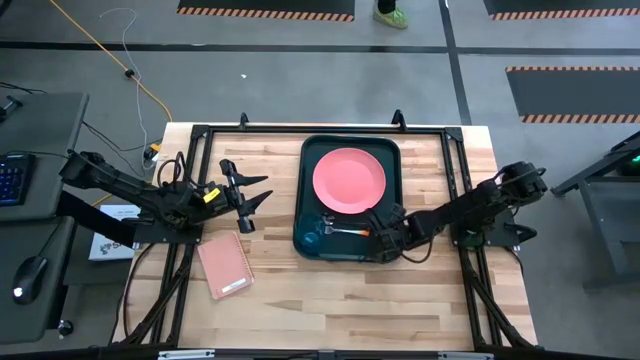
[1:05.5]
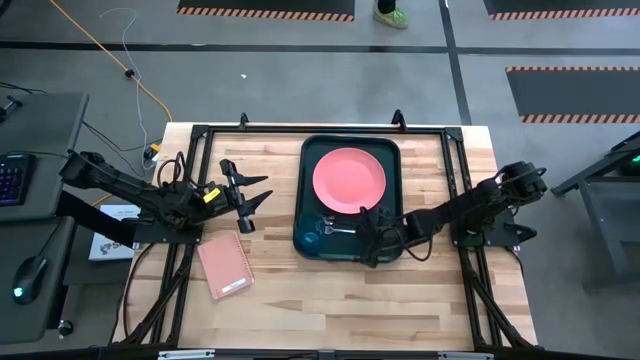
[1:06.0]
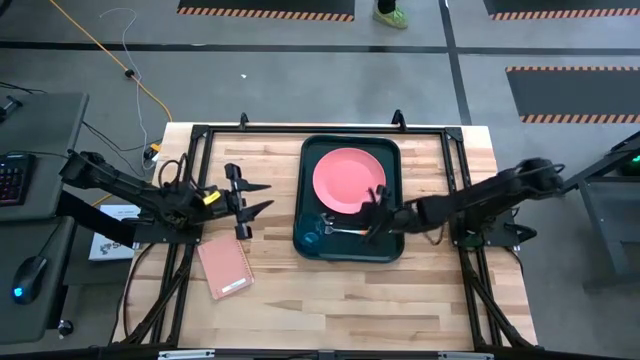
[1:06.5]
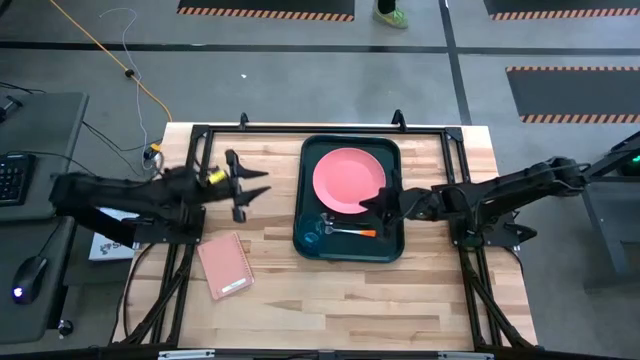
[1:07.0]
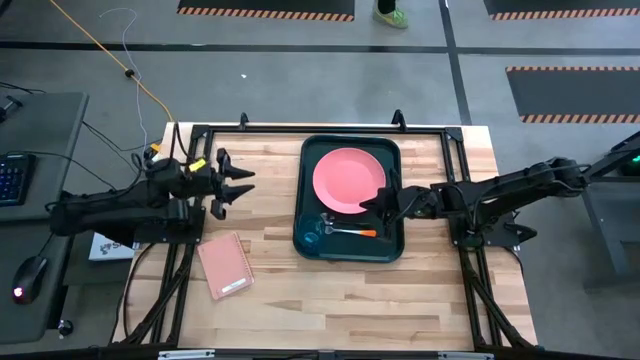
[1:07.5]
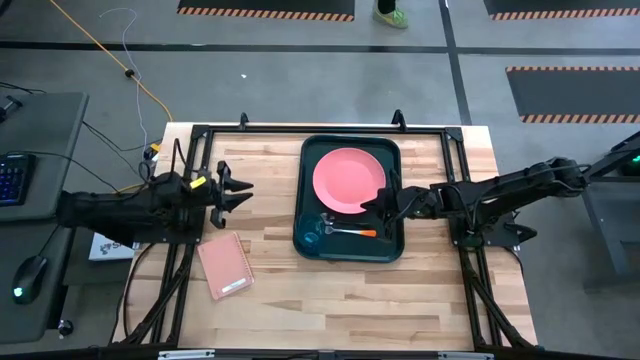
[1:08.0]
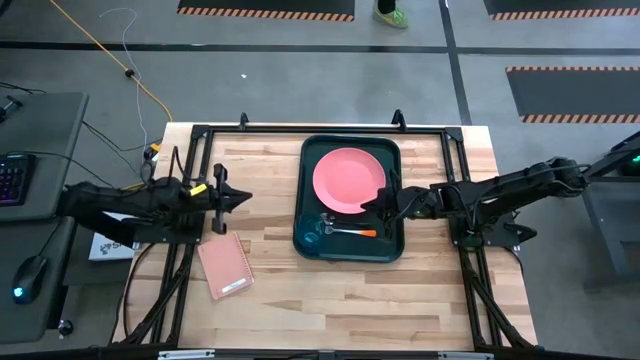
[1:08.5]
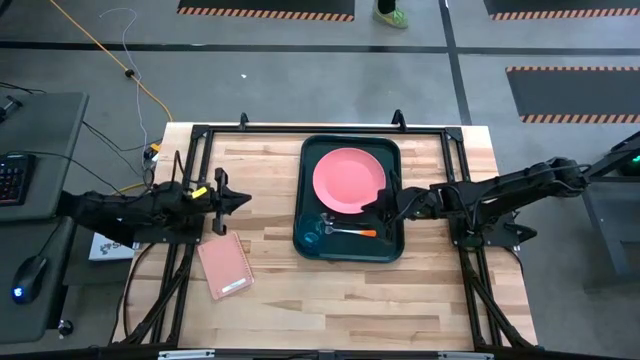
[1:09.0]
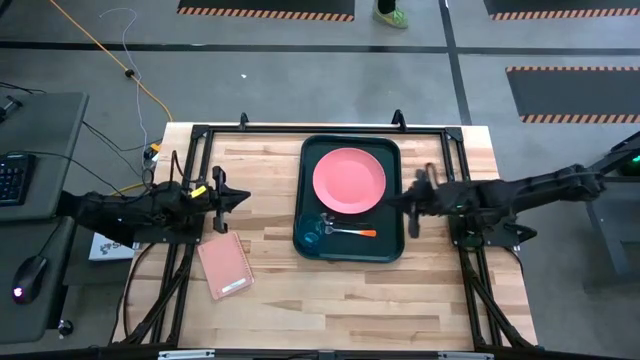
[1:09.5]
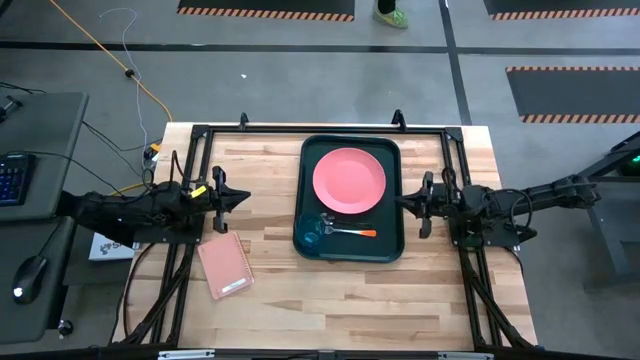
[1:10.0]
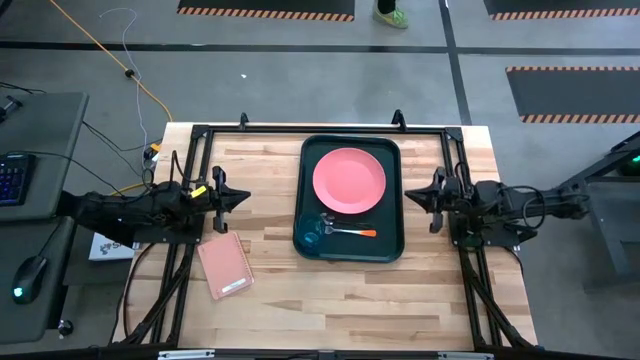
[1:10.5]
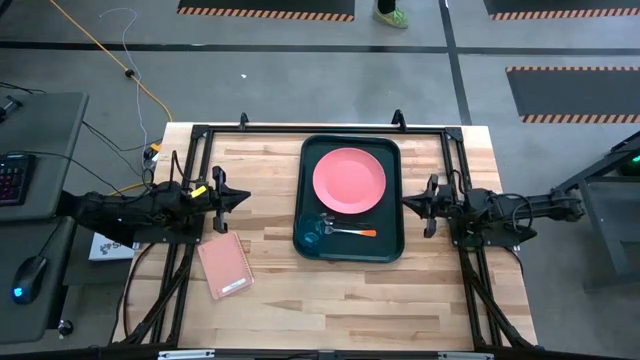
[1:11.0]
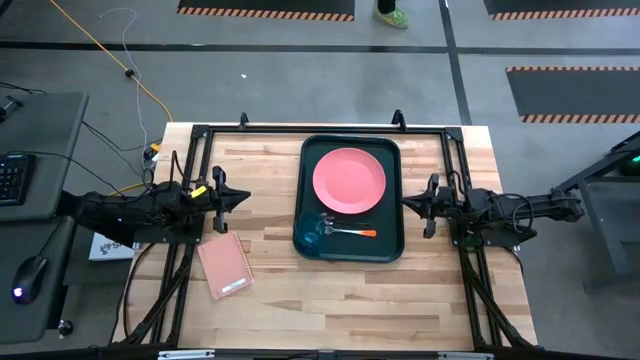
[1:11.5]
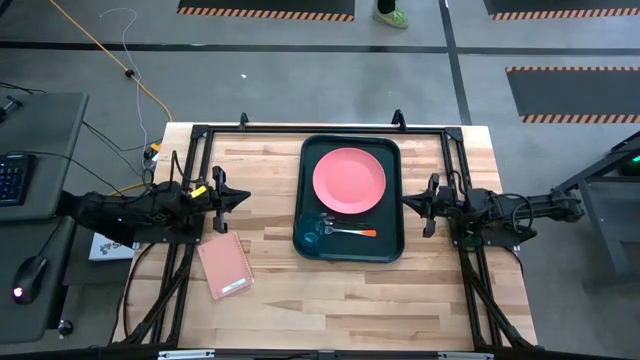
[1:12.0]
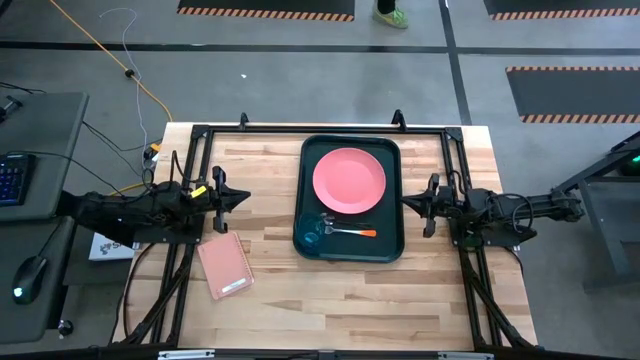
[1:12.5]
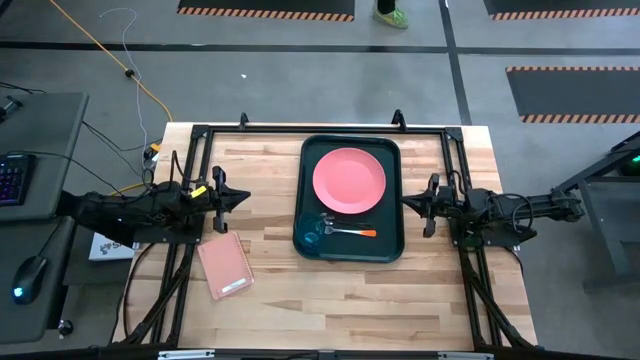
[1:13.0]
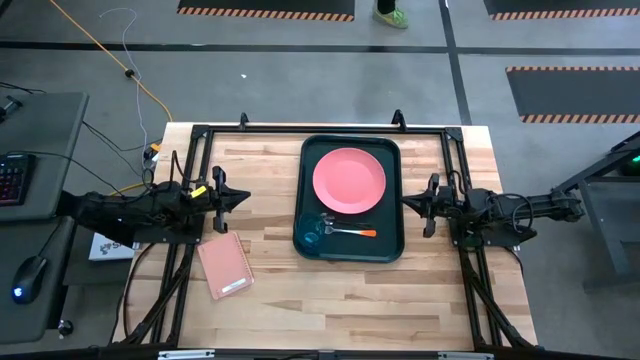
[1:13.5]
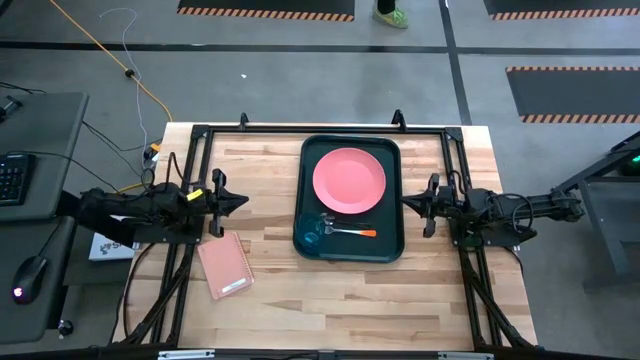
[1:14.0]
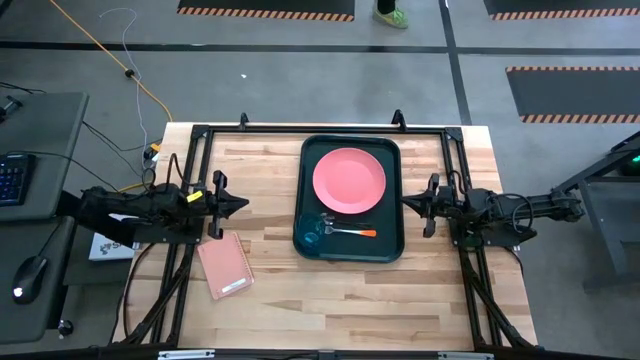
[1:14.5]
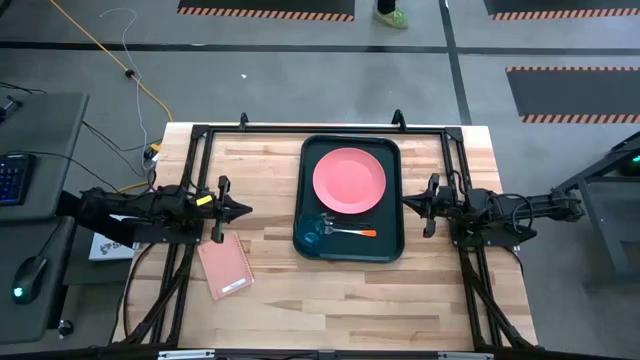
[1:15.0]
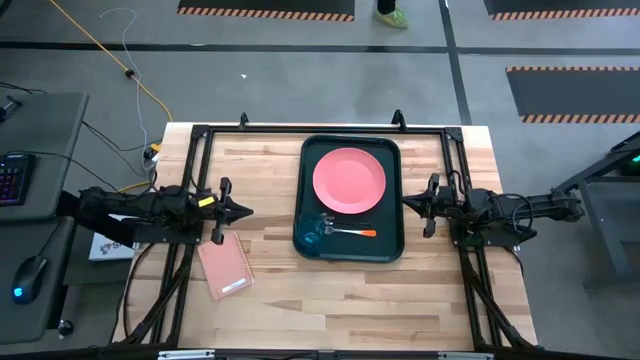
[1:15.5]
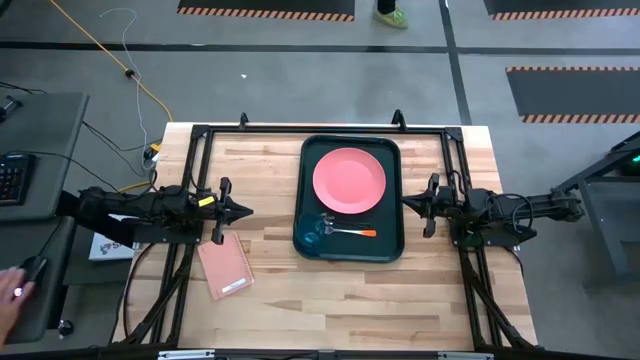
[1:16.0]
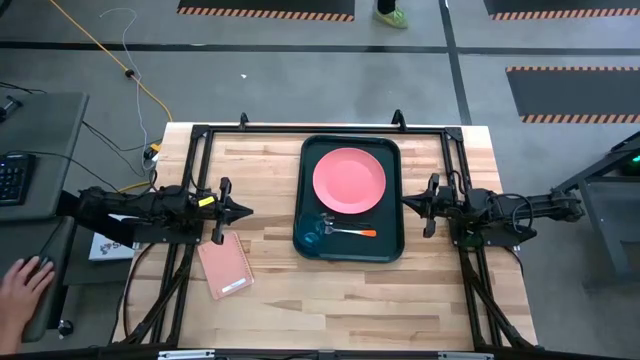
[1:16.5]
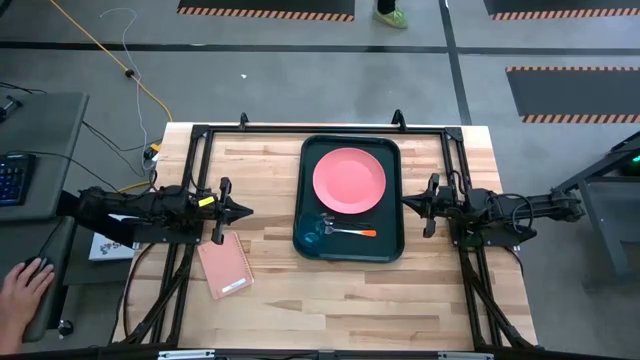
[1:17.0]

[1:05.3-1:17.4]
Task: Pick and place plate/cup/fork/spoon on tray
Return to Home Position

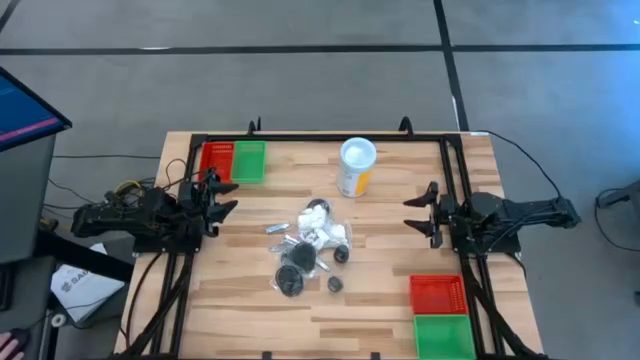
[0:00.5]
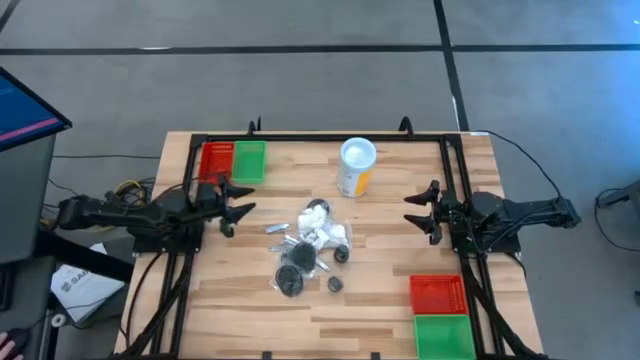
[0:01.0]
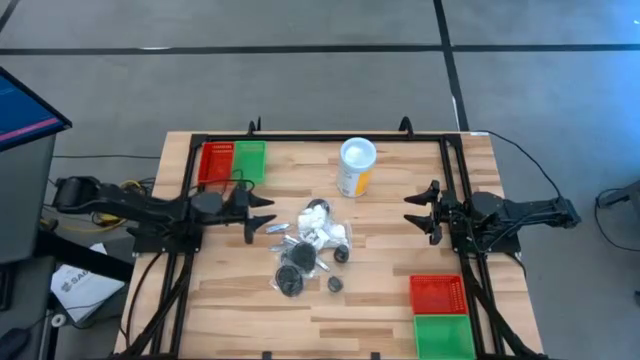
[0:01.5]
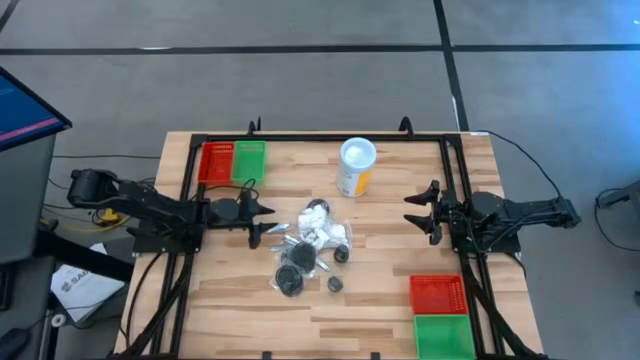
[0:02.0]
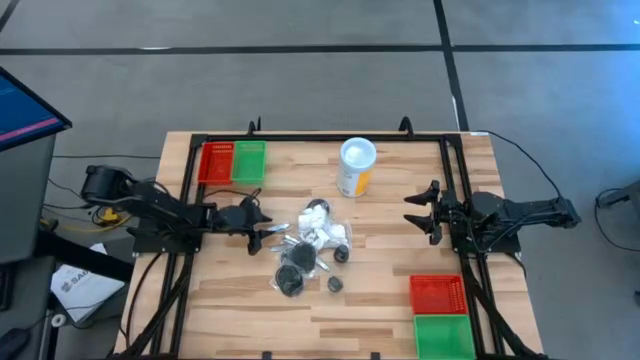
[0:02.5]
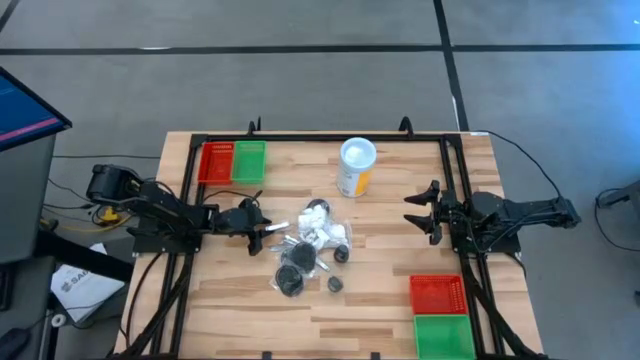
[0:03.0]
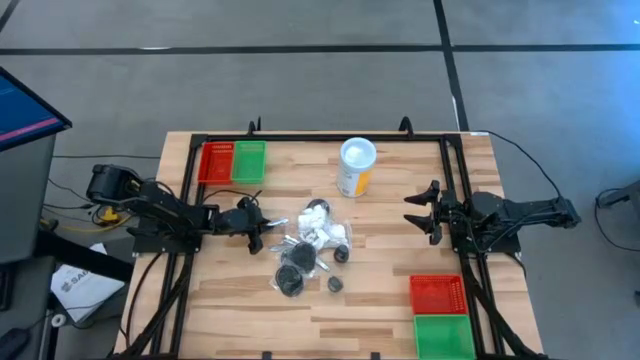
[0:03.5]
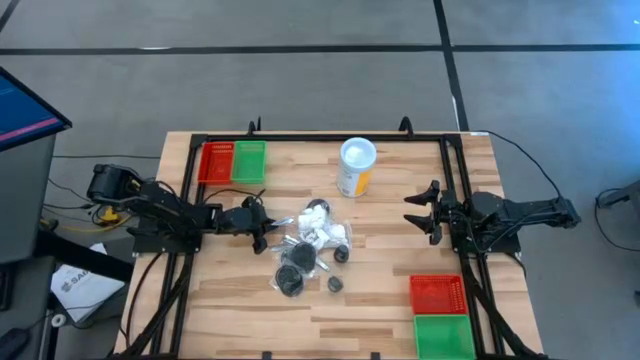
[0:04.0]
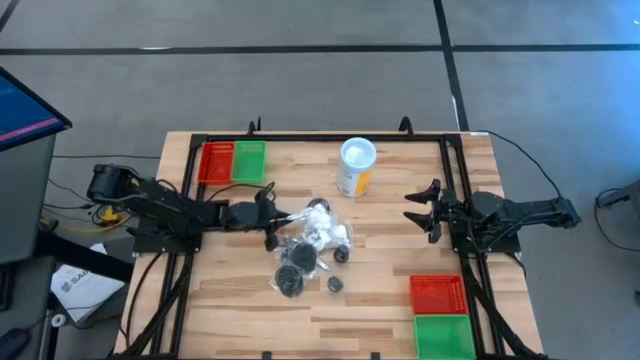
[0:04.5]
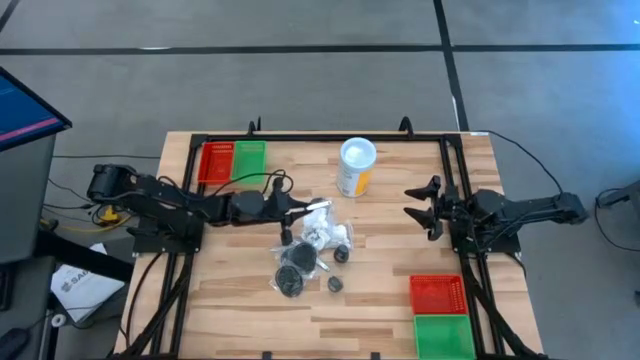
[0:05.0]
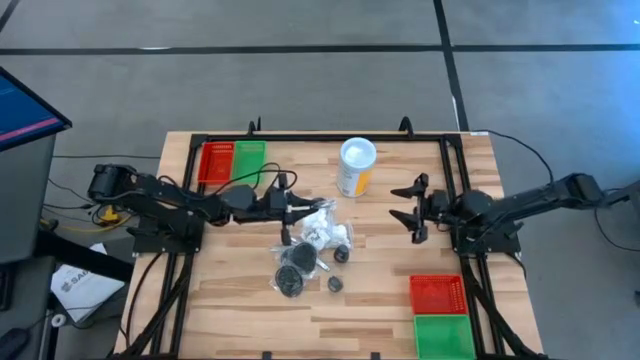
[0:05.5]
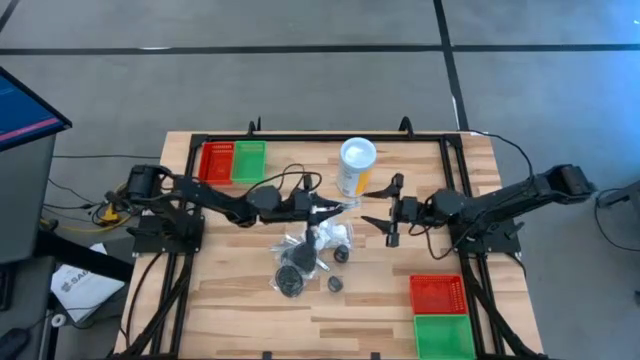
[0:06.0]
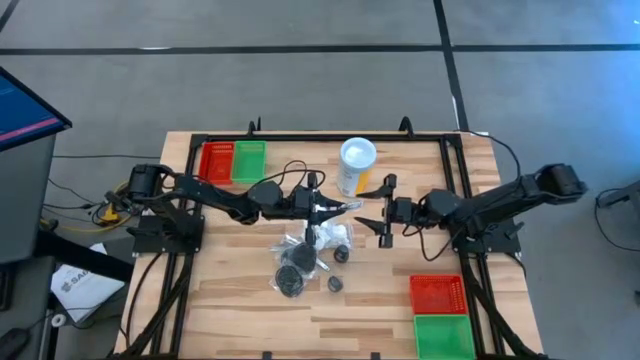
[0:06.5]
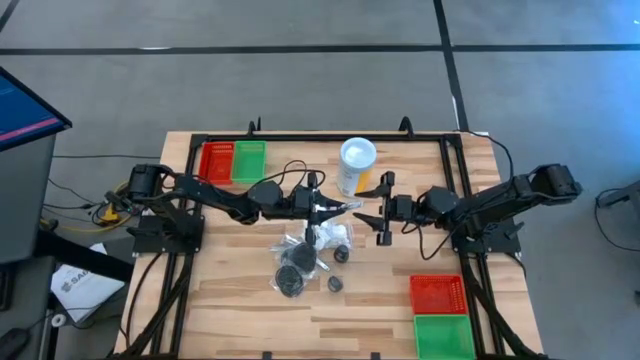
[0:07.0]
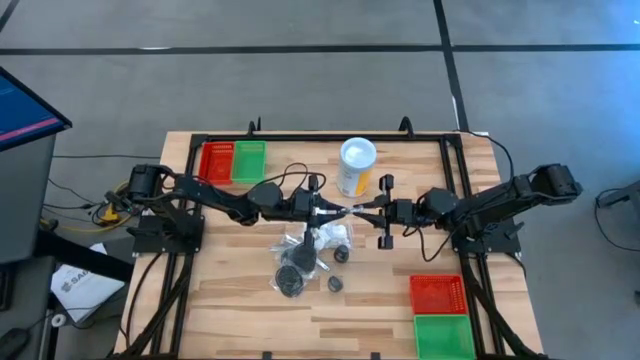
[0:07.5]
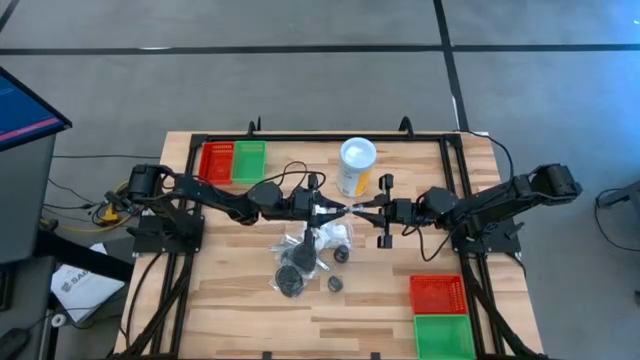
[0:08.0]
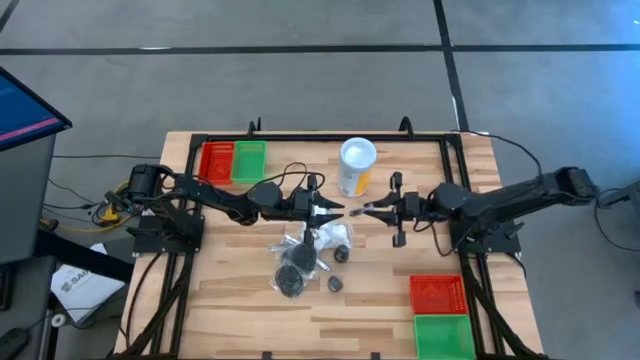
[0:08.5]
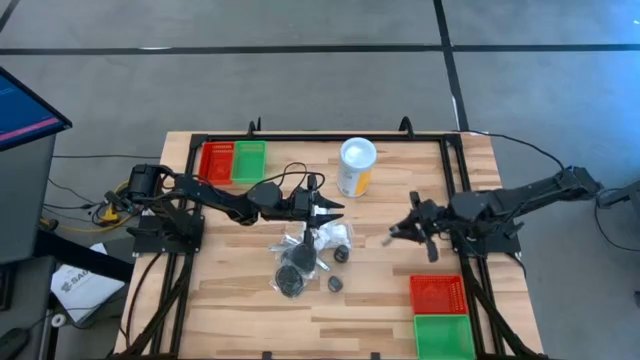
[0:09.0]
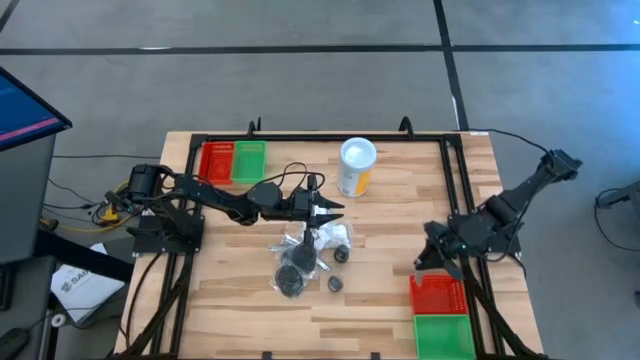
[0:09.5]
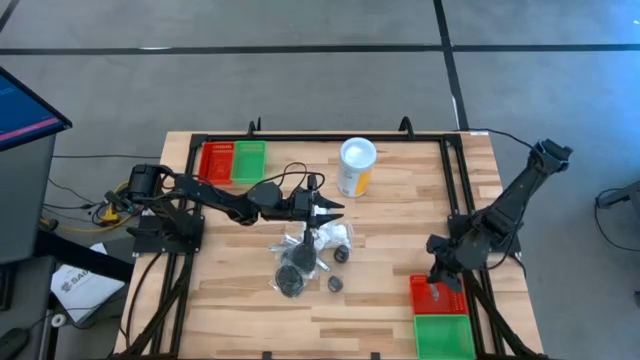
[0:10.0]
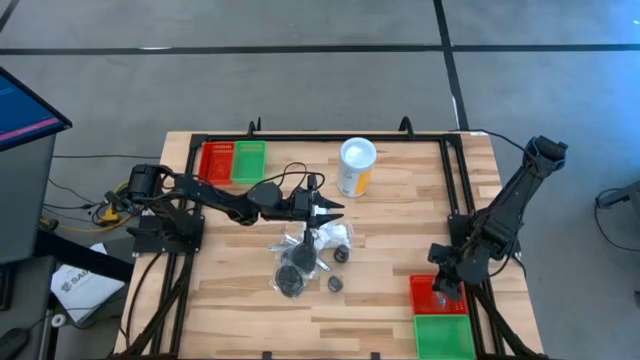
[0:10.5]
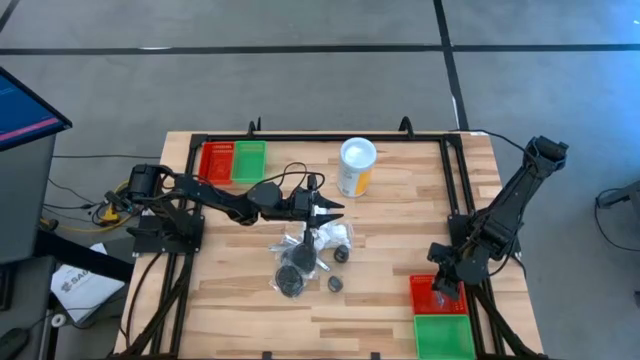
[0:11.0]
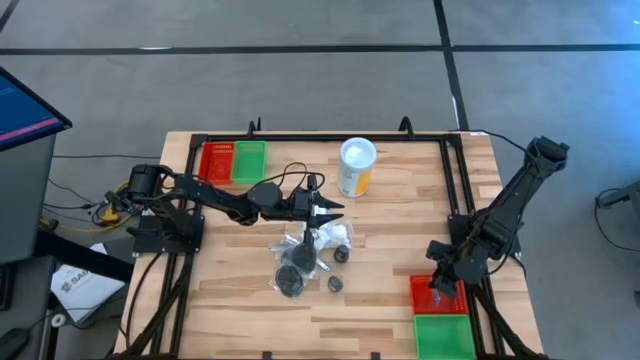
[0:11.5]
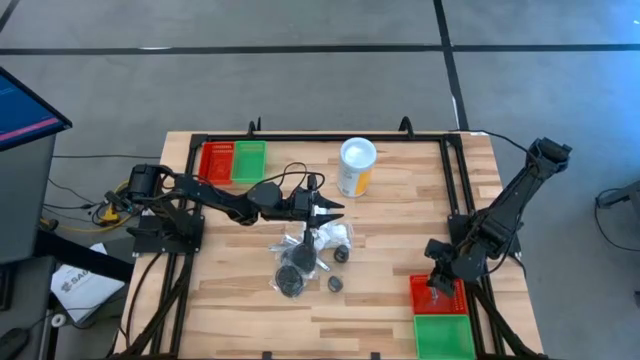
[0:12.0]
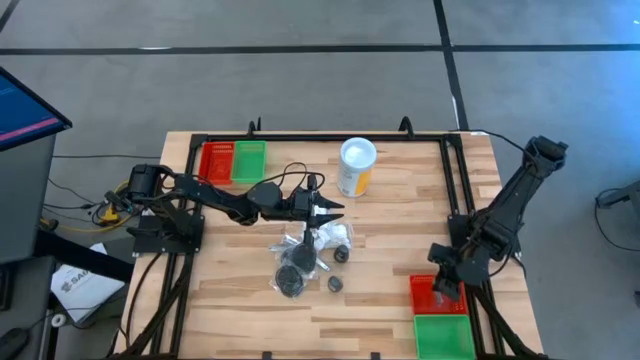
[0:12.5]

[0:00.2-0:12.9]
Task: Pick & Place Travel size toiletries
Put the silver nail cutter into the bottom red bin
